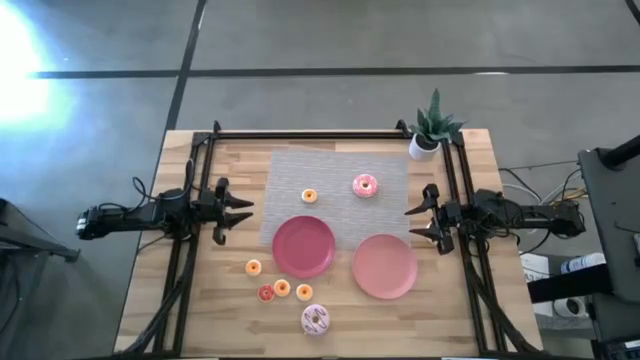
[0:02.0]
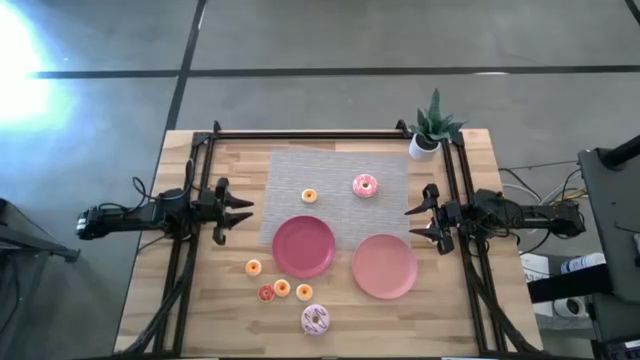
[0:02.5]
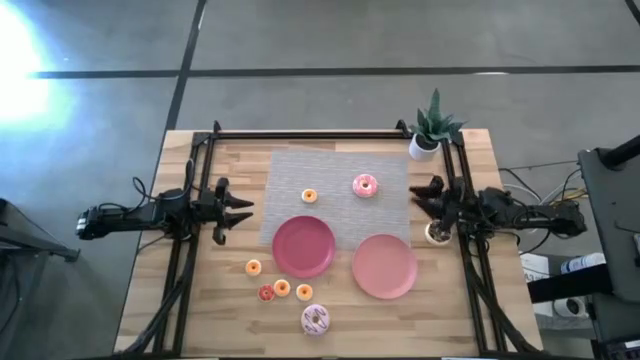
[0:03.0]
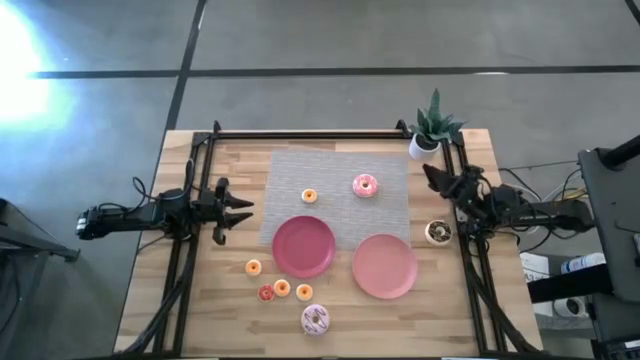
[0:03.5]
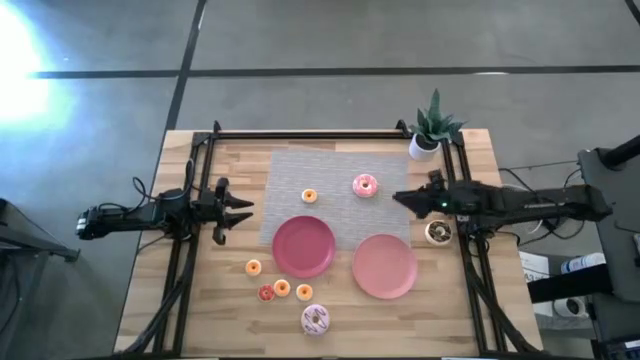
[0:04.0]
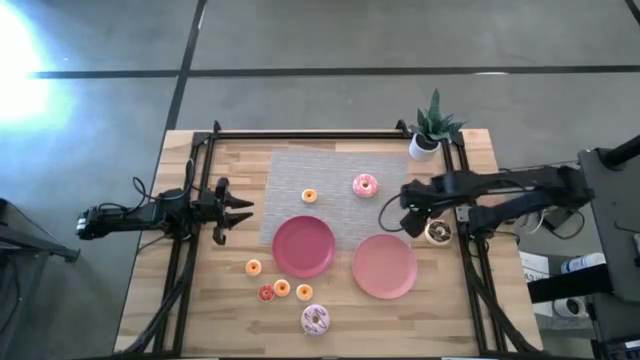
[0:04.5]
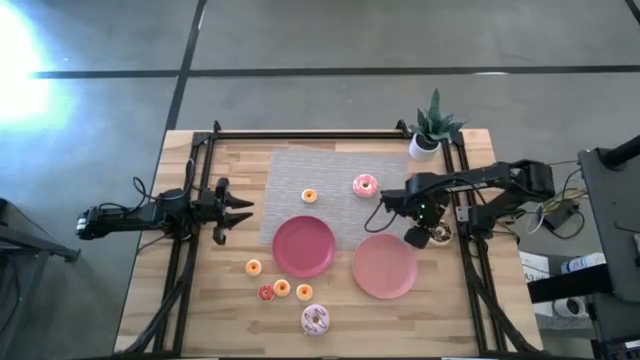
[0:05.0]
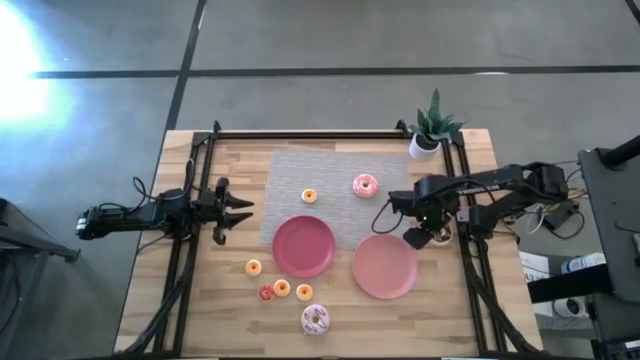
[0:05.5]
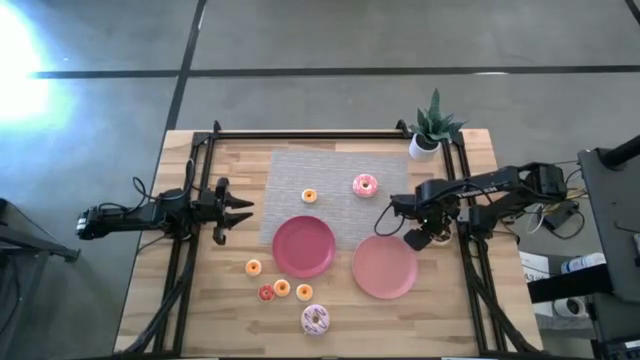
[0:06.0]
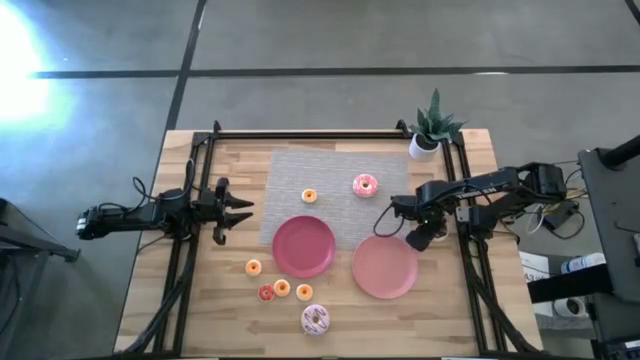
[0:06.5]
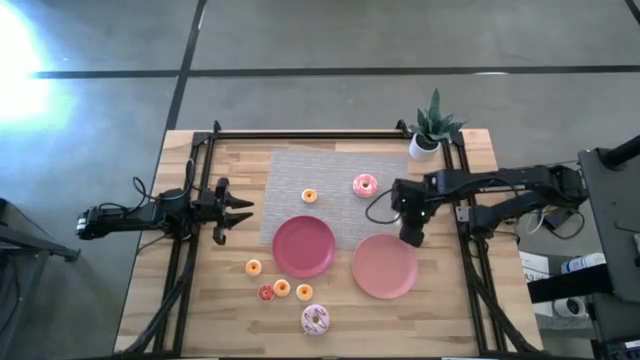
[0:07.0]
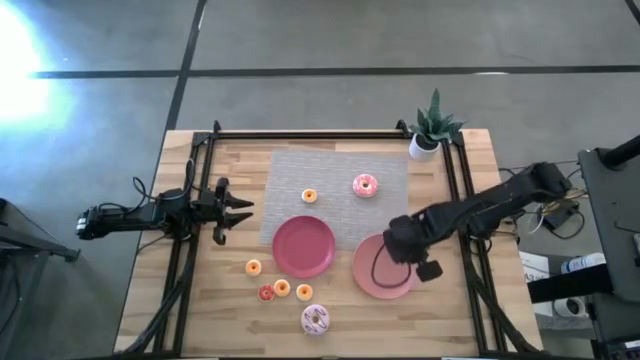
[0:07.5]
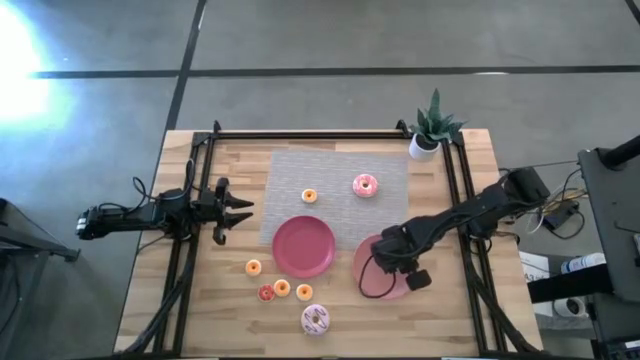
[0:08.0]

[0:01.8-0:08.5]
Task: Pick & Place donuts
Put the big black donut on the light pink plate

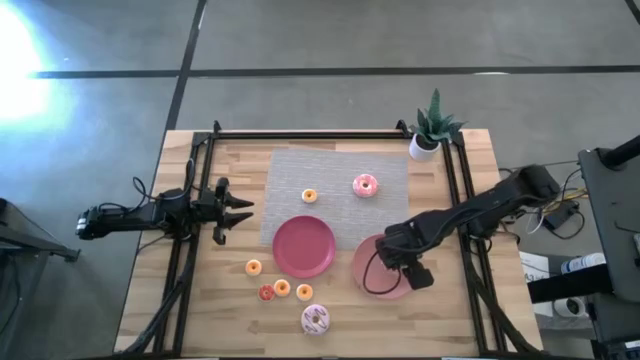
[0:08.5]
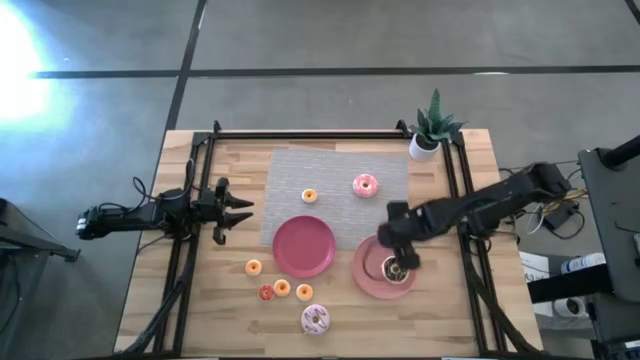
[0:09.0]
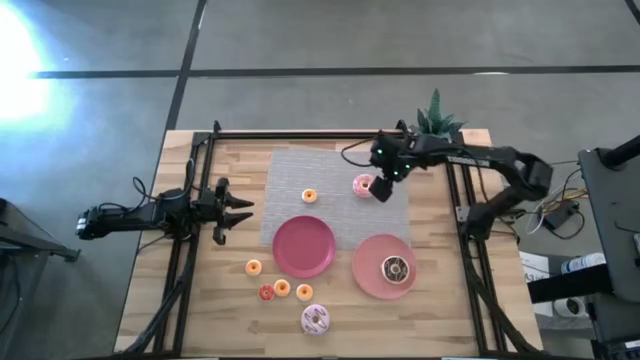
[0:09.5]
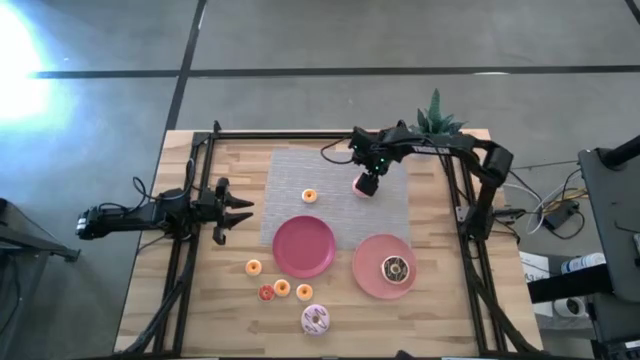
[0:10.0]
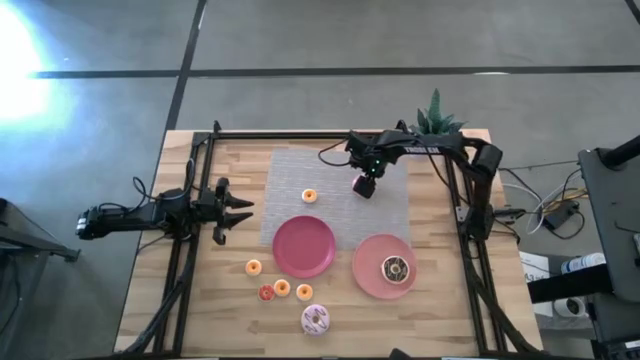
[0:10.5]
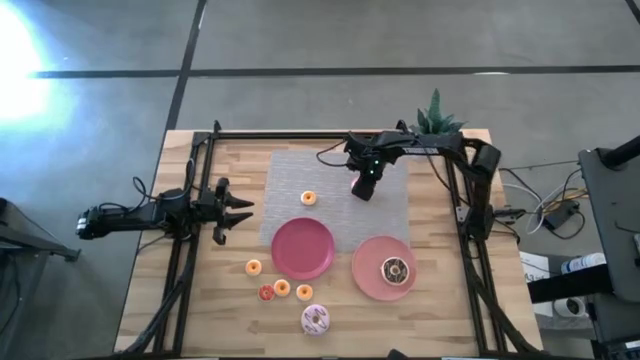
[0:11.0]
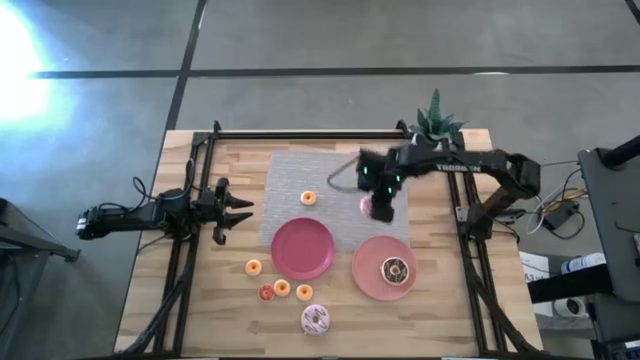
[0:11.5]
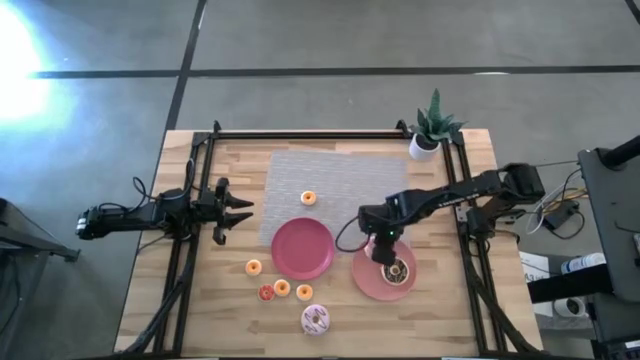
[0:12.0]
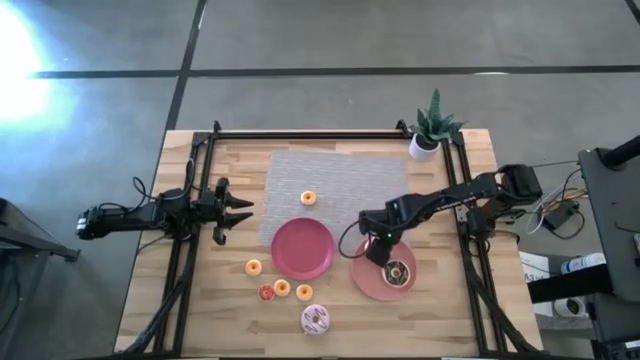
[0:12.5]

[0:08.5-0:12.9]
Put the big pink donut on the light pink plate

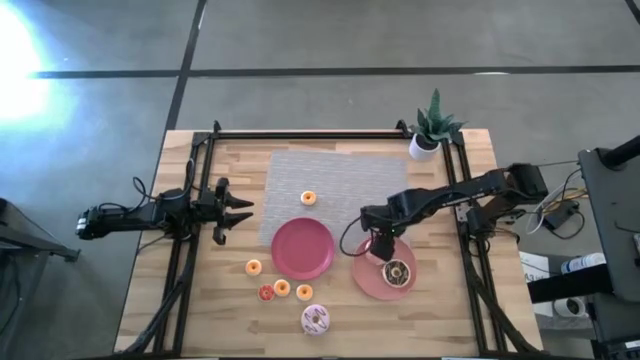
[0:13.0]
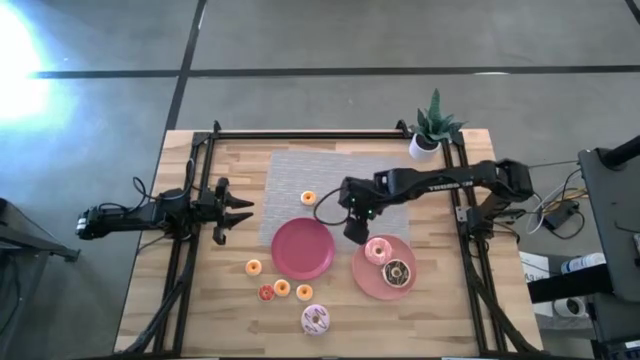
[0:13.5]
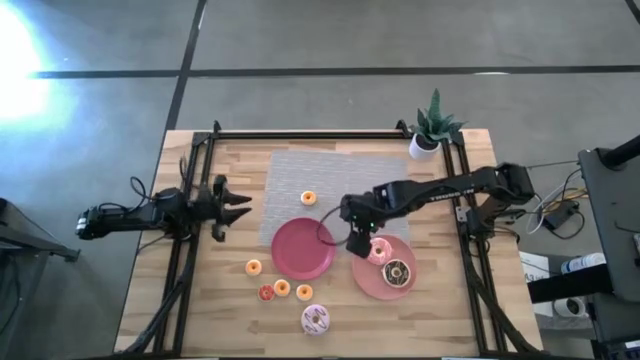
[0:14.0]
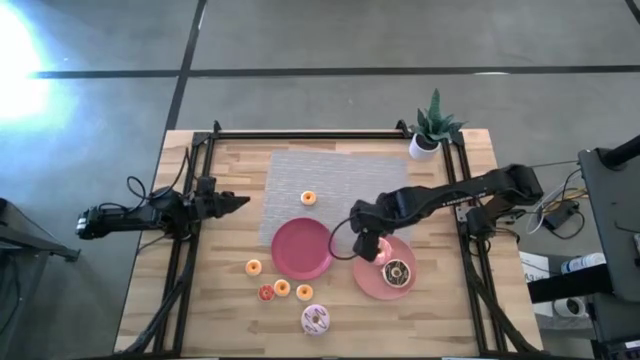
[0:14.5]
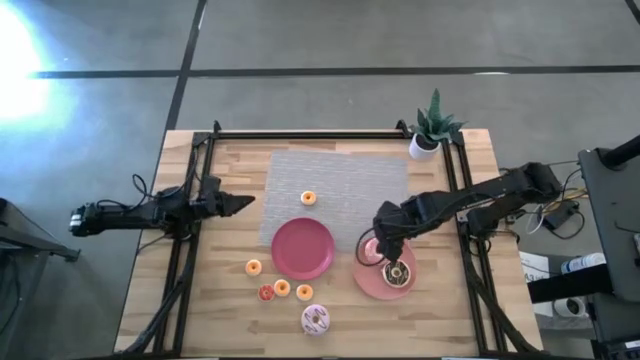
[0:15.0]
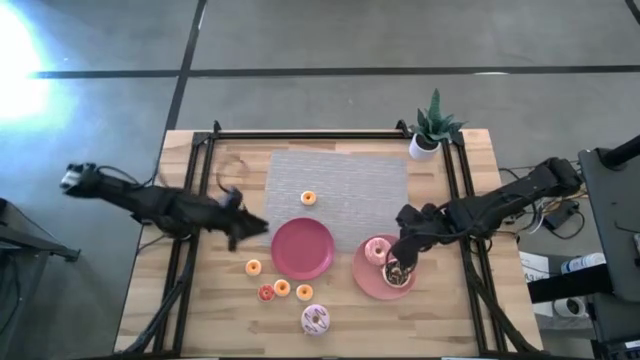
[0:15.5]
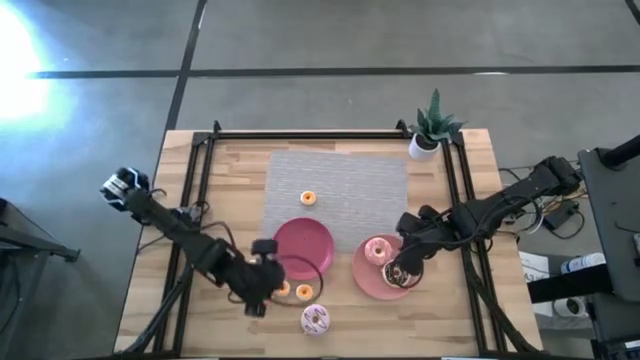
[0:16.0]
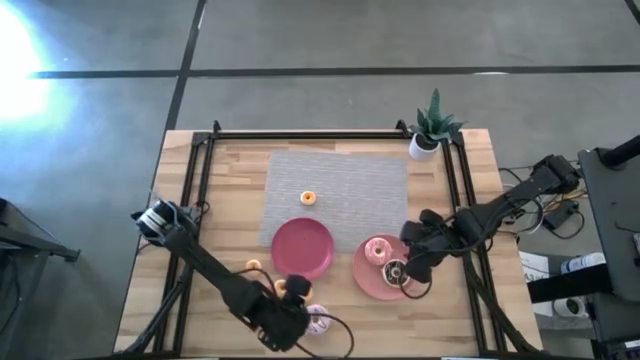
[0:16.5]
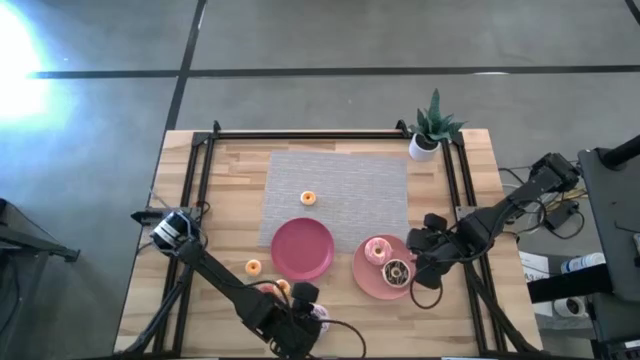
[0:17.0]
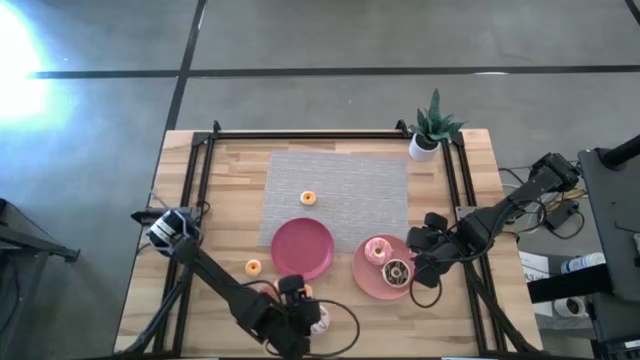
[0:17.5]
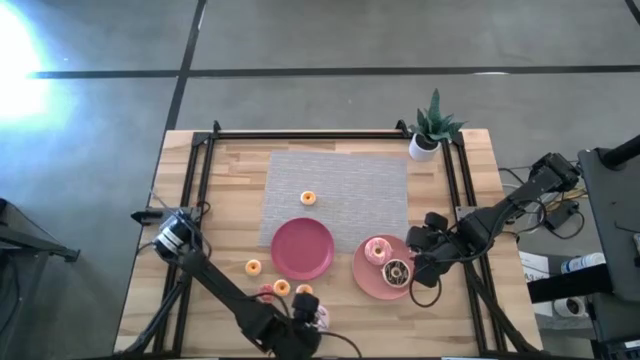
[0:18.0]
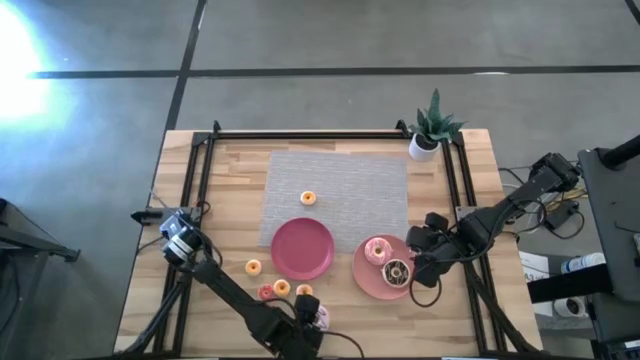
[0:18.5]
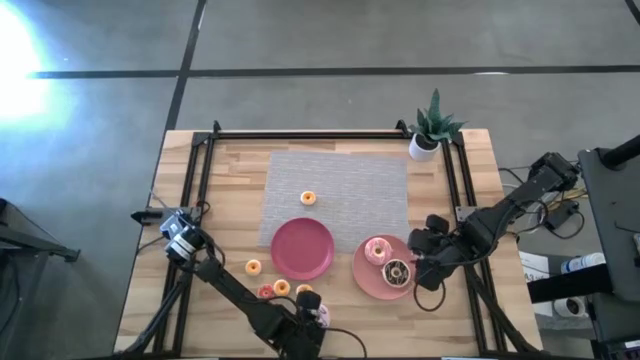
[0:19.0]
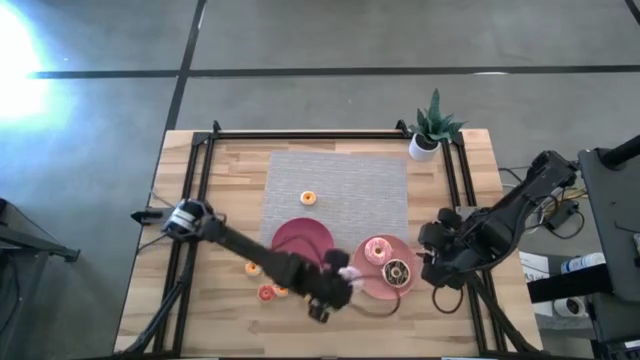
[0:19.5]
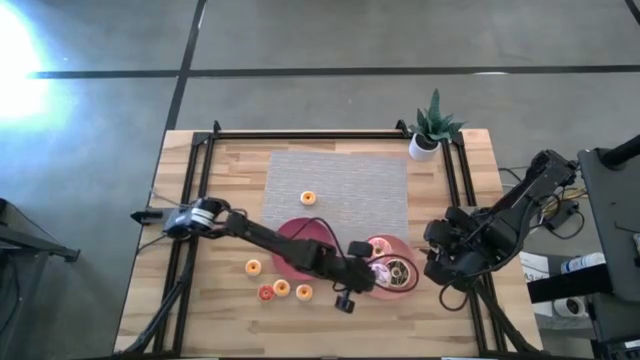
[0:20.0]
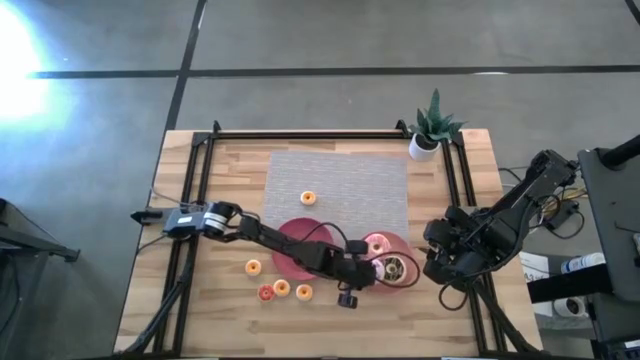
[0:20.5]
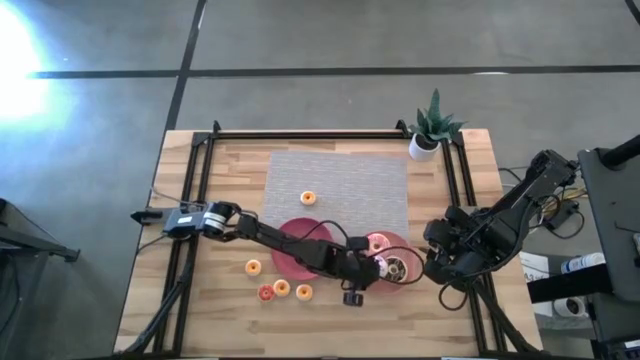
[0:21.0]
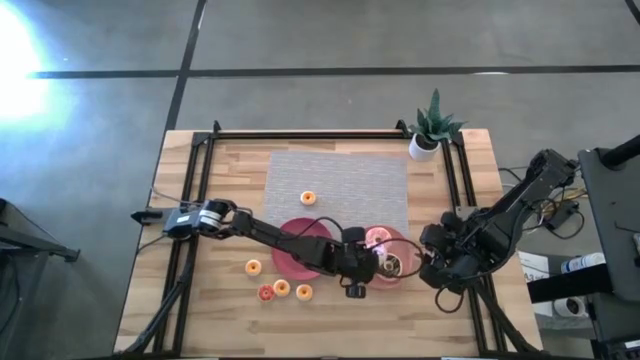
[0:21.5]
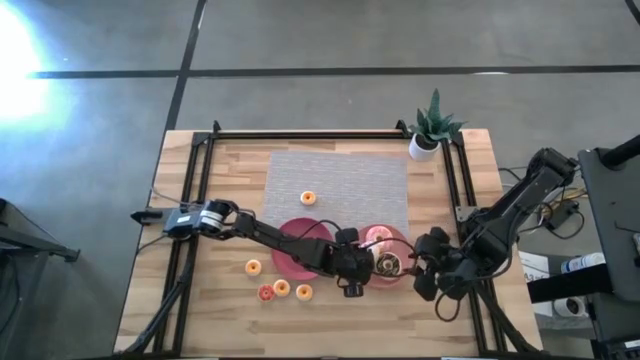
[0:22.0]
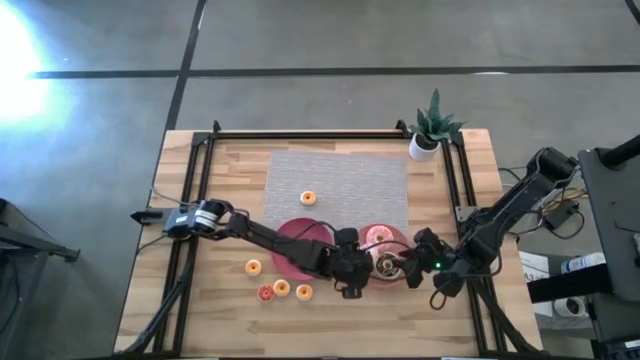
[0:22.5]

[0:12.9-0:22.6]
Put the big purple donut on the light pink plate
